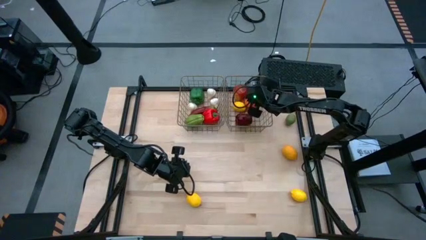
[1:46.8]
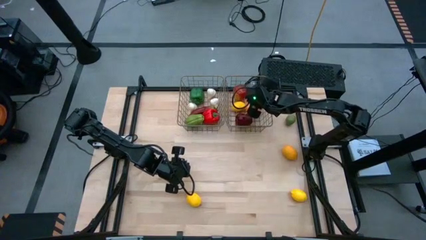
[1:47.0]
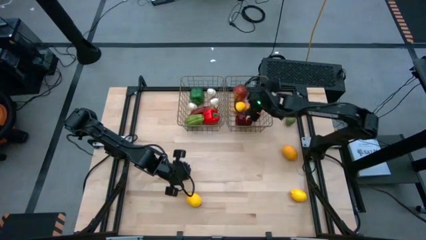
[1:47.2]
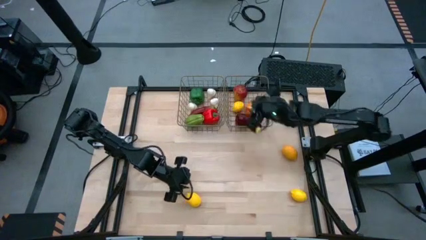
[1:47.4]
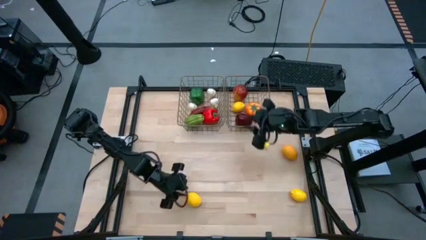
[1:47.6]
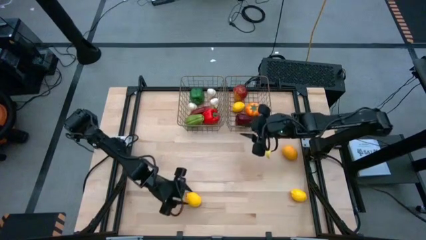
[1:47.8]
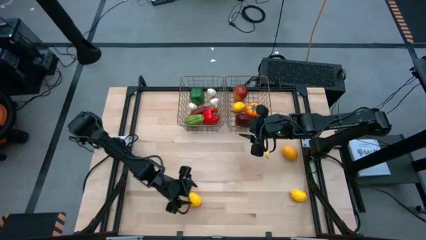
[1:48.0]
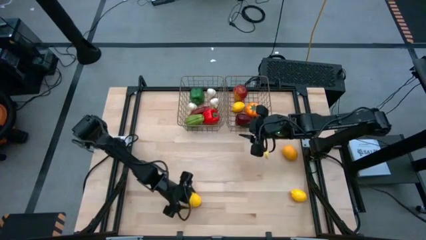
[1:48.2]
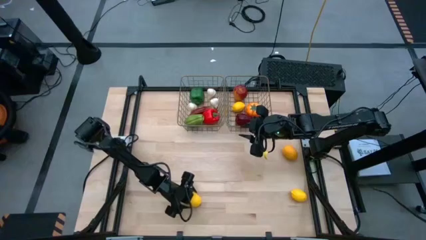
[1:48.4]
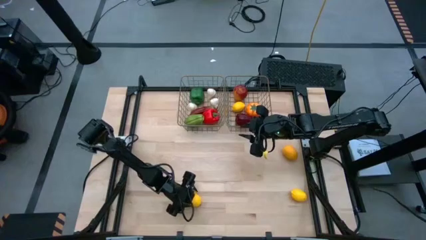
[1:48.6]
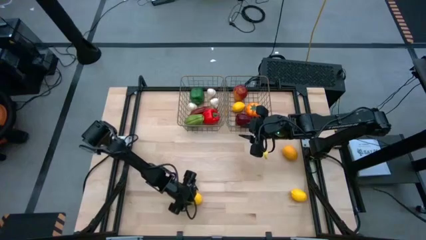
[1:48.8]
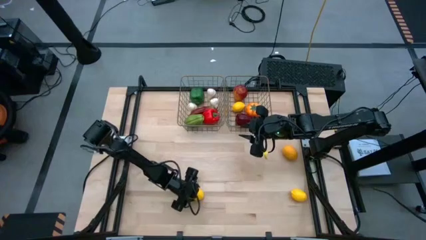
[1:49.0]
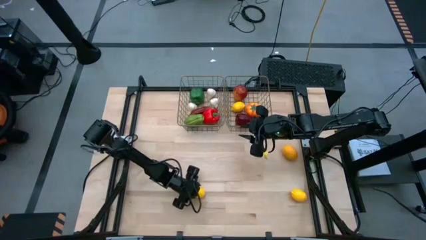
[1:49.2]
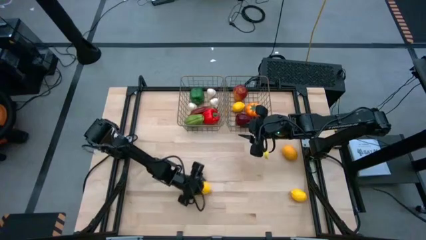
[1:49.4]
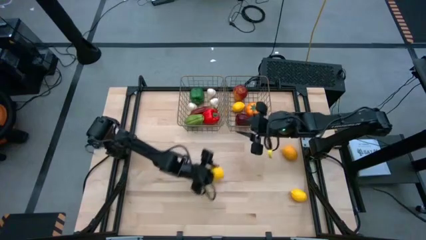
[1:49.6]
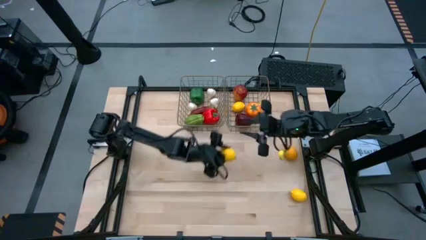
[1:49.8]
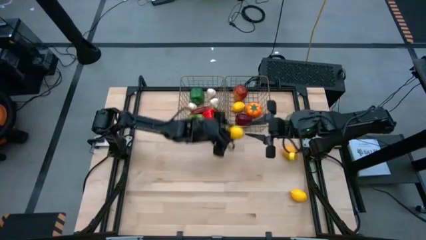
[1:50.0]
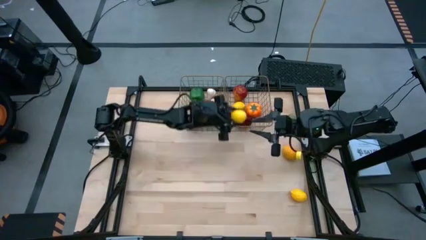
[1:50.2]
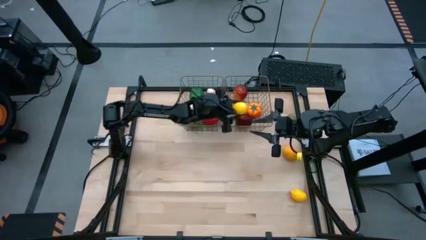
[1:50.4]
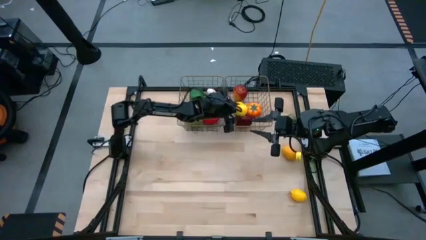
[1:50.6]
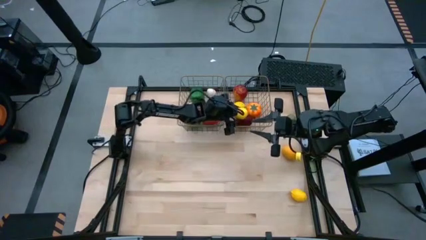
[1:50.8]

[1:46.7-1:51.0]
Task: Sort produce into baskets
Put the left yellow lemon into the right mesh basket

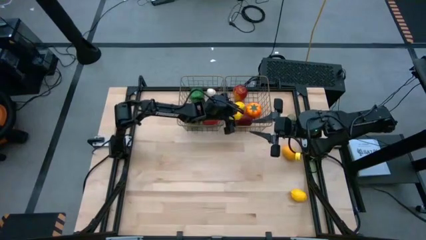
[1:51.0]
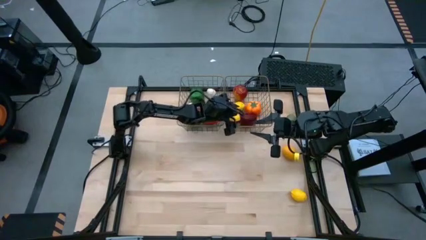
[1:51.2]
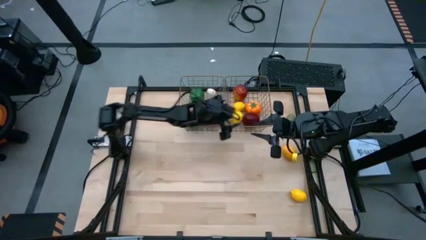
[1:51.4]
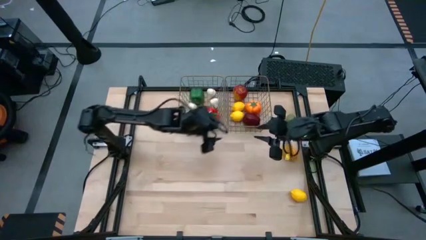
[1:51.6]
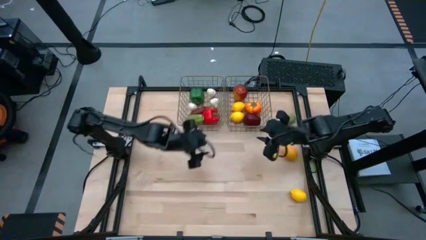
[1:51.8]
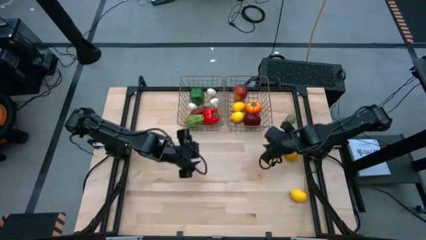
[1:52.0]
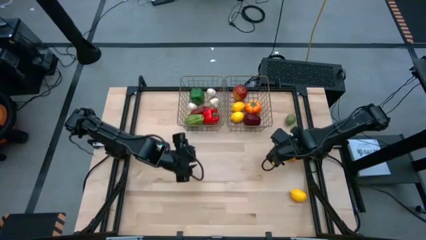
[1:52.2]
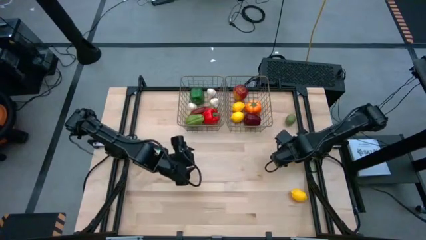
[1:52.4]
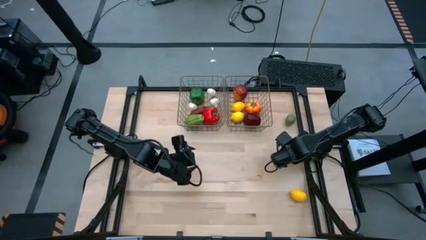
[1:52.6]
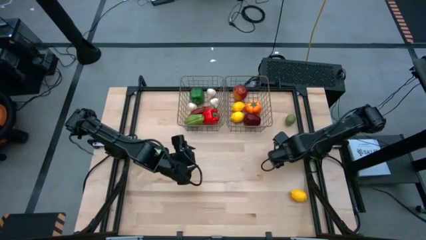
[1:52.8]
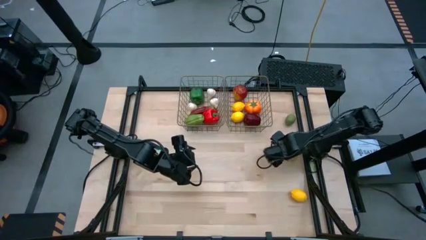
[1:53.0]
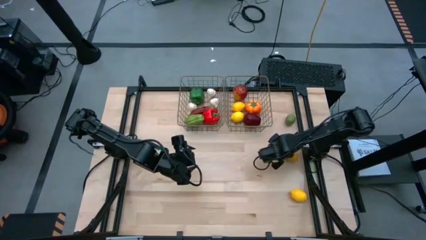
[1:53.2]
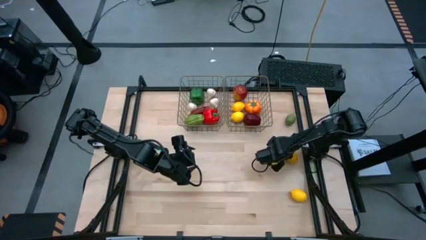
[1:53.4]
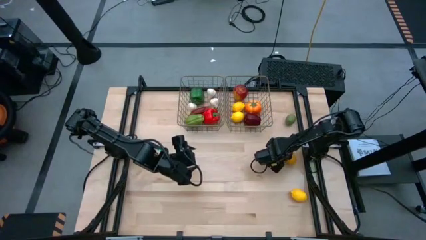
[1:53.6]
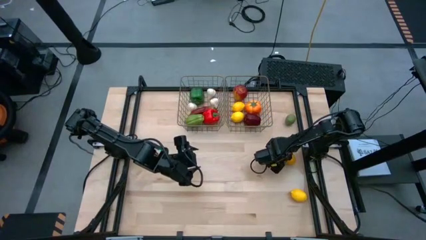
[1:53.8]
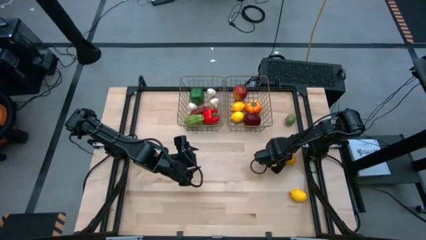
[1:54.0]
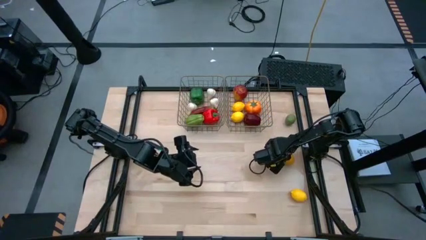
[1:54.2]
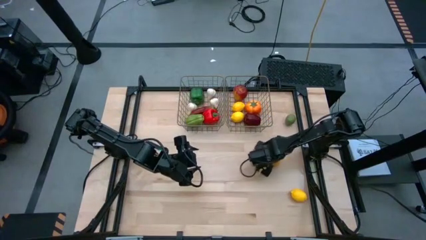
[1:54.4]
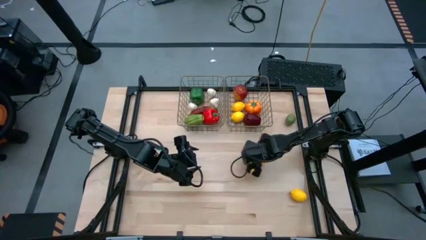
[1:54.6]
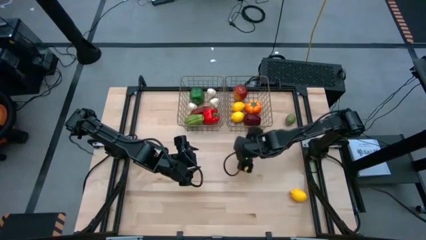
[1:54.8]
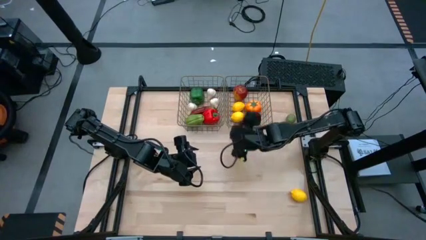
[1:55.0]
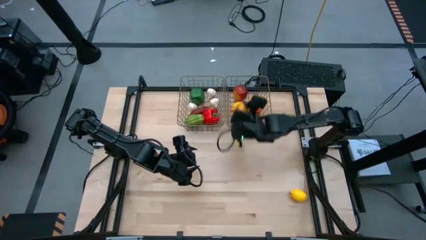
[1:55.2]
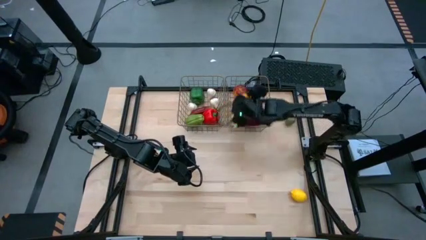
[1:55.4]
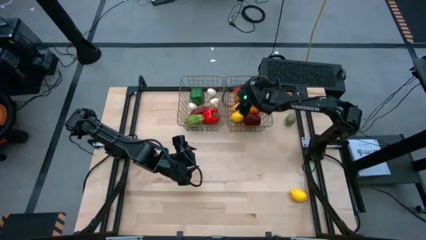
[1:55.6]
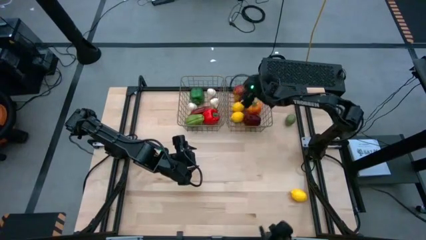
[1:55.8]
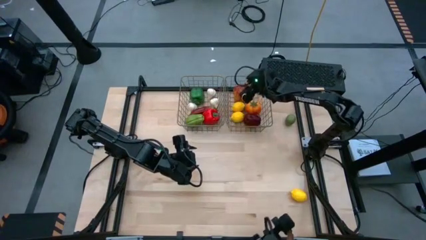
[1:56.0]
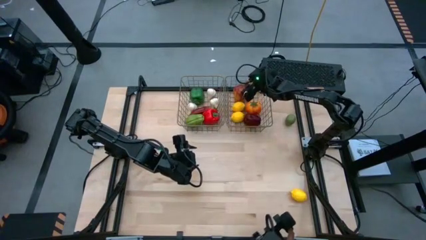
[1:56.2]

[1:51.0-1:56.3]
Put the orange into the right mesh basket

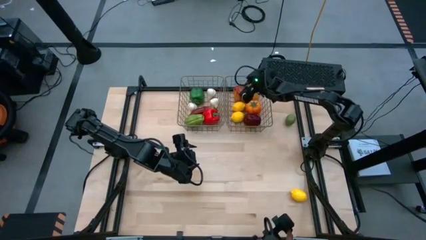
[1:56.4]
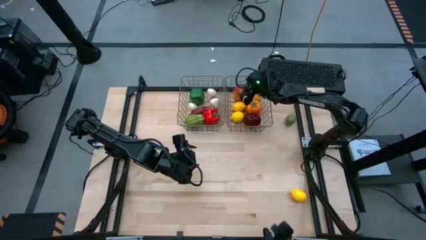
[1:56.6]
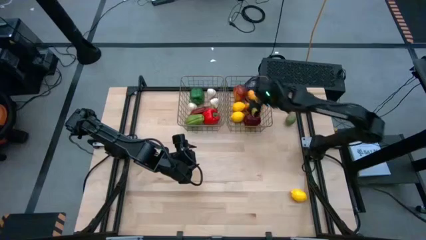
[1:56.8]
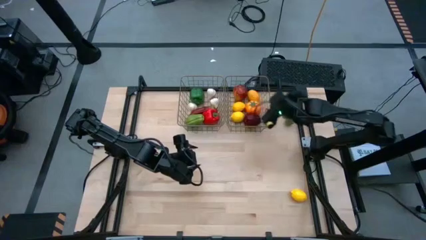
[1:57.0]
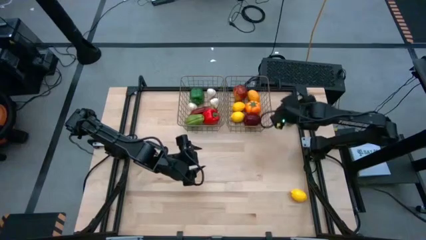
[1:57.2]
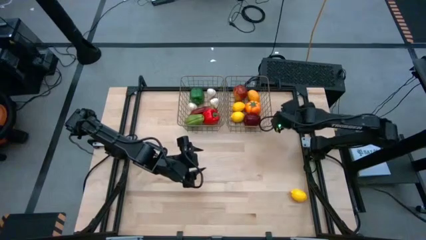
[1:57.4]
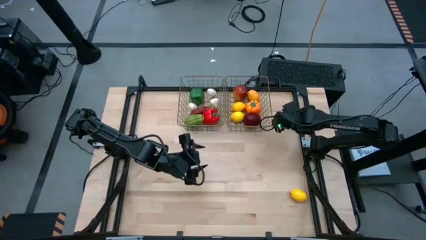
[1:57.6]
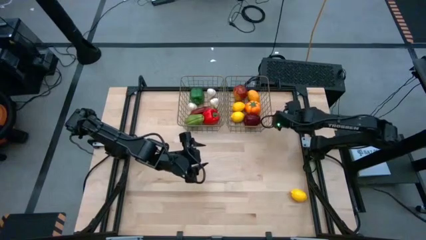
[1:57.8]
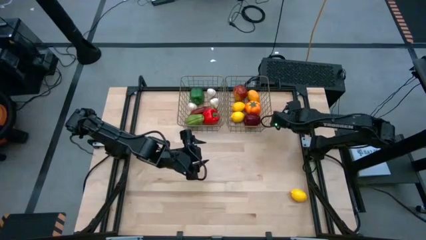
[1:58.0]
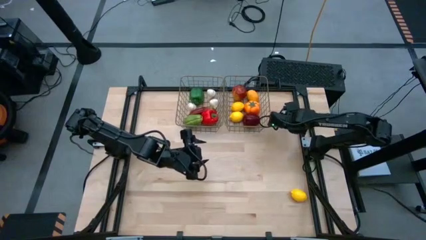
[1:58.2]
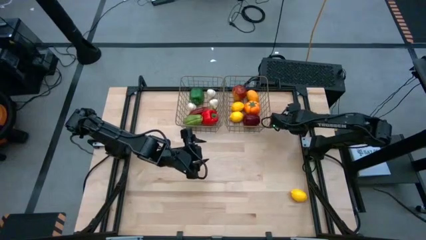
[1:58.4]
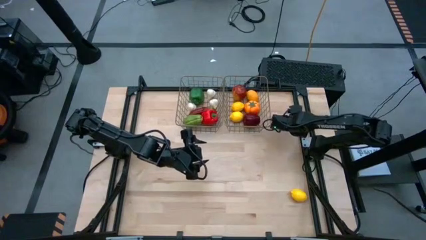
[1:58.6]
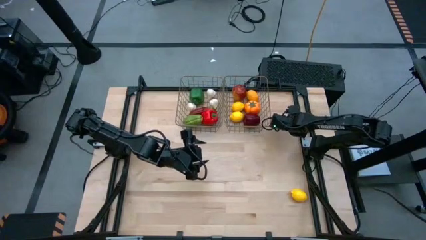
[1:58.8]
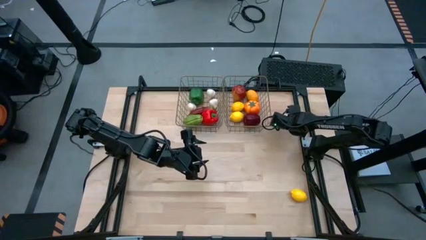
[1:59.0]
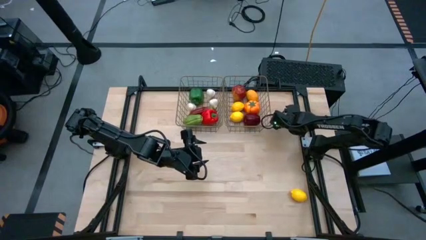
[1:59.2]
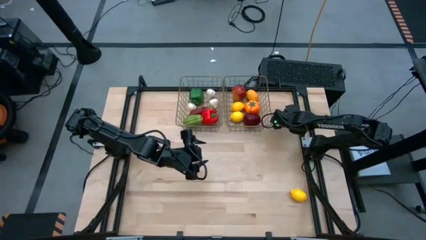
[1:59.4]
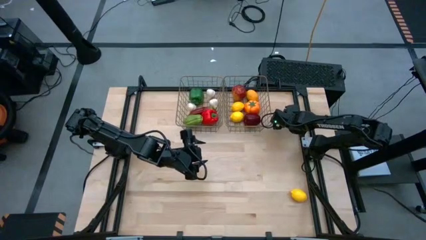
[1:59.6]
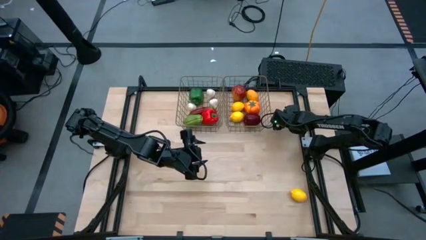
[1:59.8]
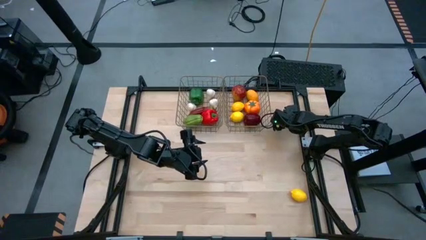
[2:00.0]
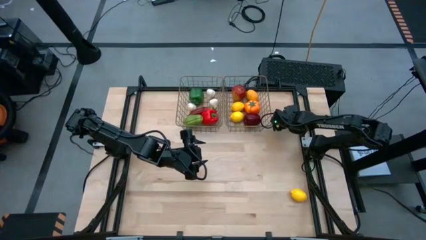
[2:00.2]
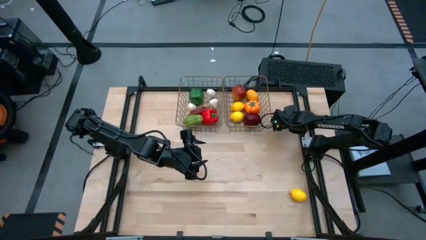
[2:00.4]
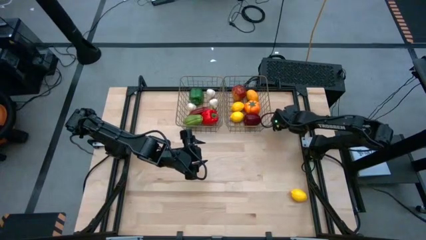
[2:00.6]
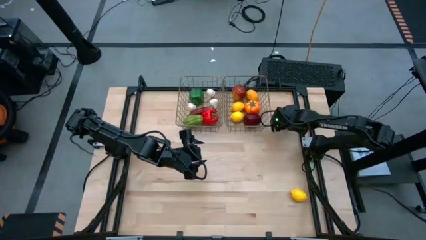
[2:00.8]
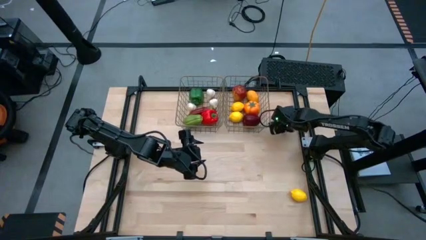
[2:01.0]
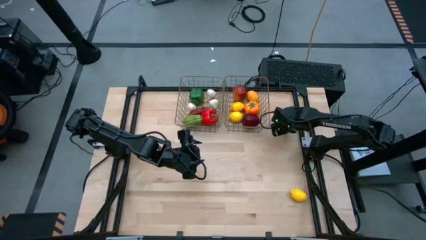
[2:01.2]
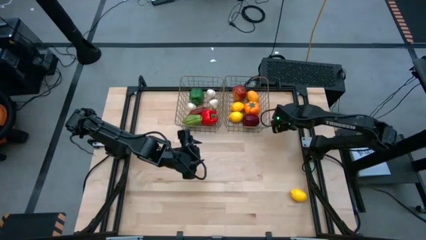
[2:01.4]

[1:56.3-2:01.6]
Put the green lemon into the right mesh basket

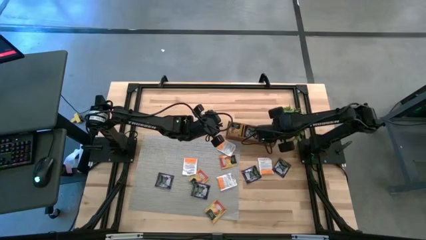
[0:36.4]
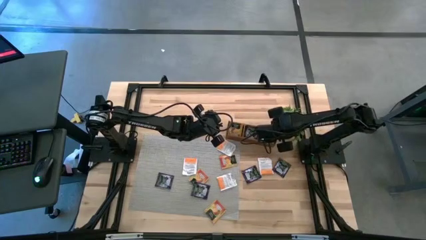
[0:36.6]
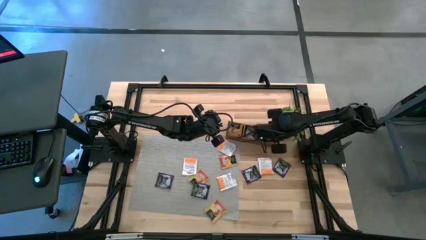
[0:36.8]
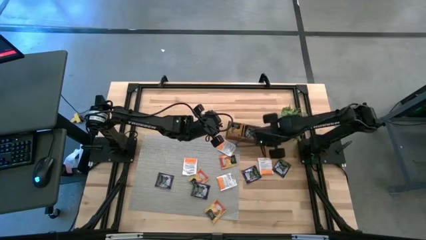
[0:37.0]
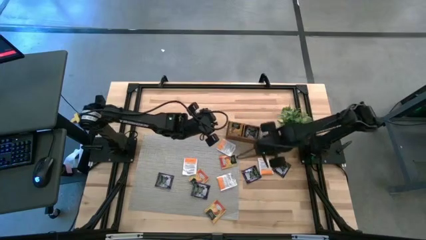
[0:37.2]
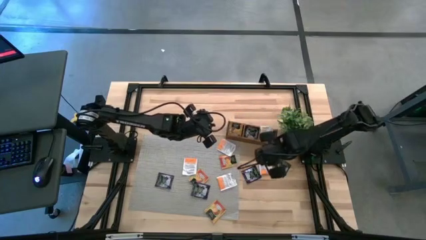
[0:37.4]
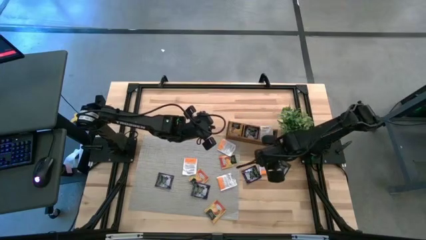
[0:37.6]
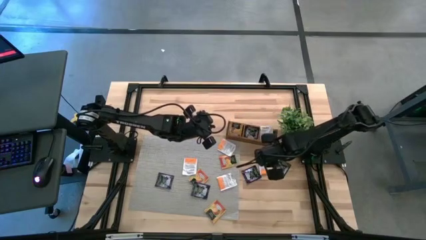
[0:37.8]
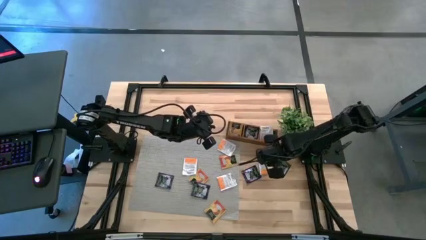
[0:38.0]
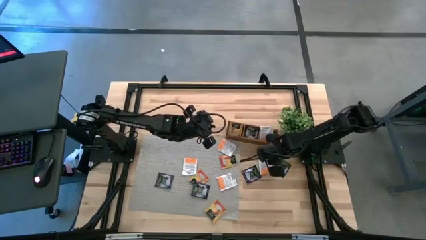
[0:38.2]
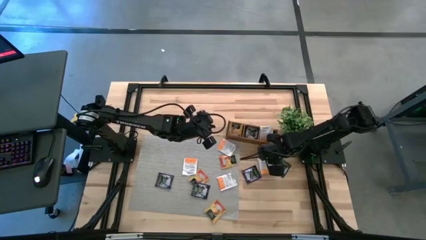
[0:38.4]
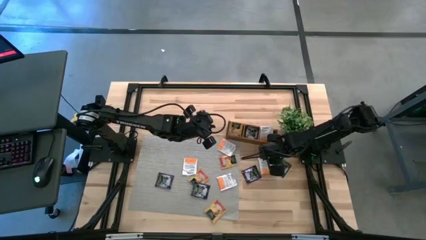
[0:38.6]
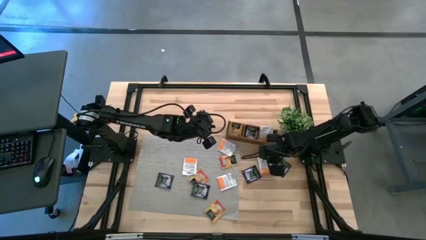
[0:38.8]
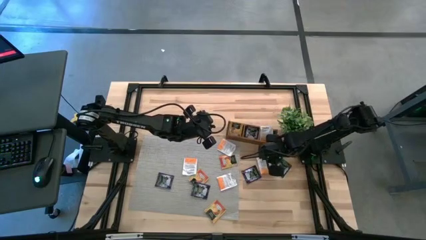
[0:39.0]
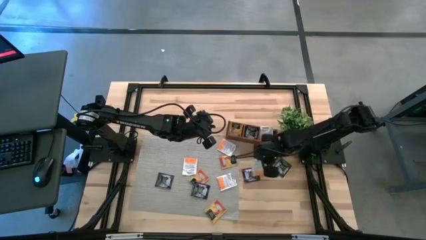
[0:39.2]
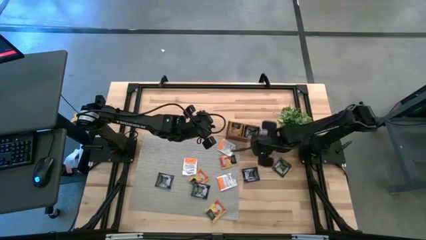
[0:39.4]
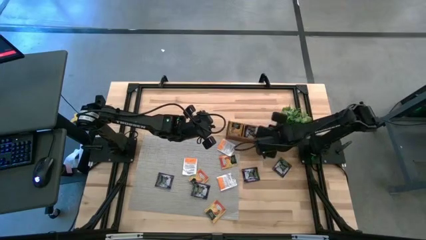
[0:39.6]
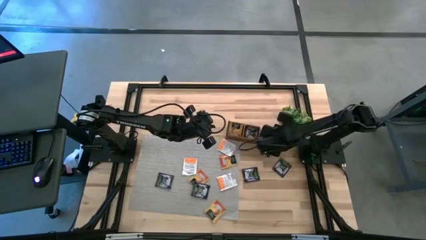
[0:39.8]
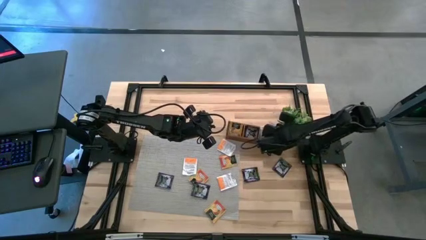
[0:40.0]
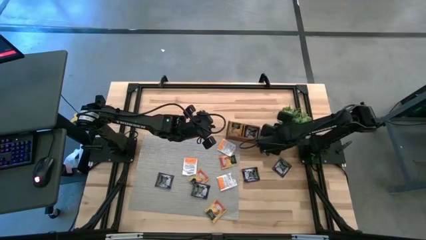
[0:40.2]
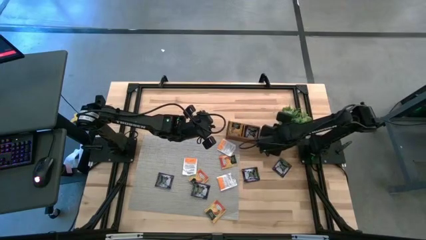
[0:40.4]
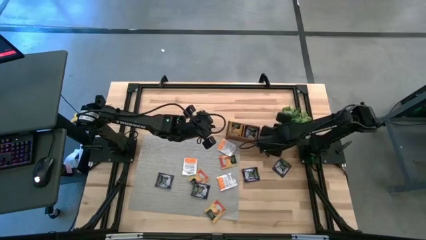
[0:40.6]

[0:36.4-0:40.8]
Task: Pick & Place Tea
Put the white orange tea bag in the right section of the wooden organizer
